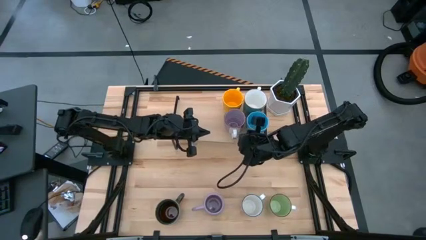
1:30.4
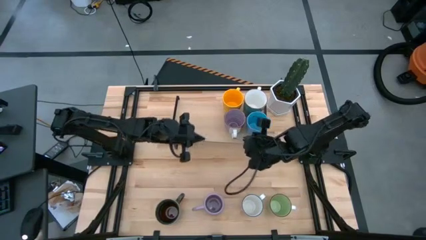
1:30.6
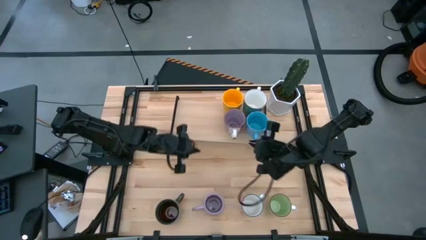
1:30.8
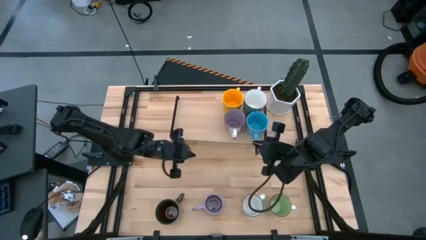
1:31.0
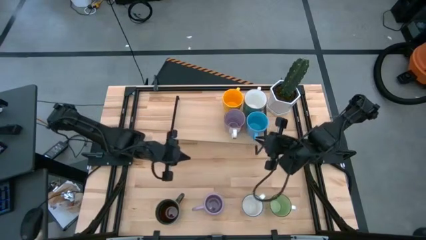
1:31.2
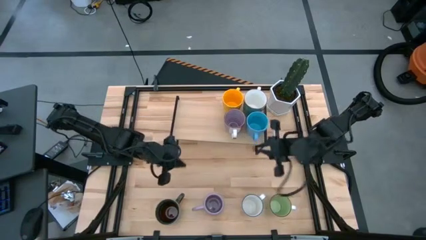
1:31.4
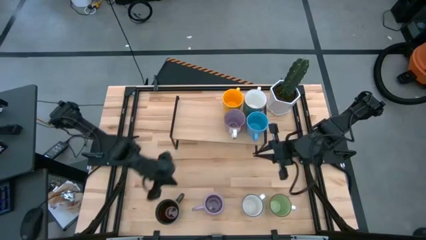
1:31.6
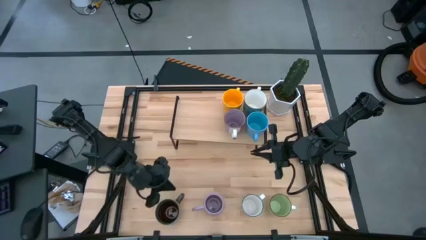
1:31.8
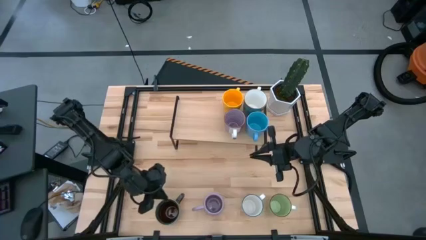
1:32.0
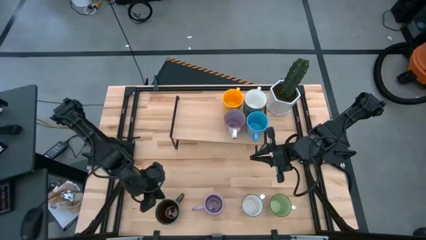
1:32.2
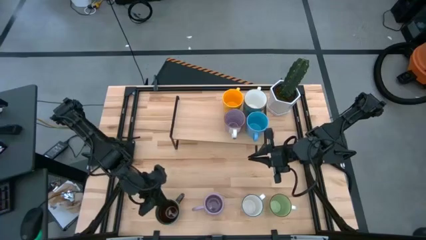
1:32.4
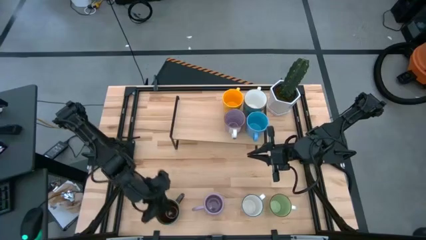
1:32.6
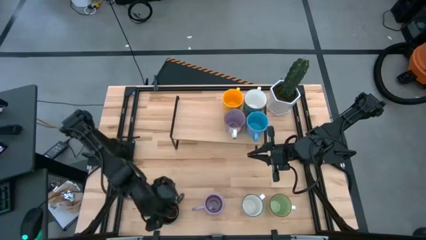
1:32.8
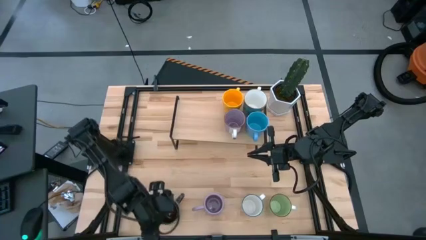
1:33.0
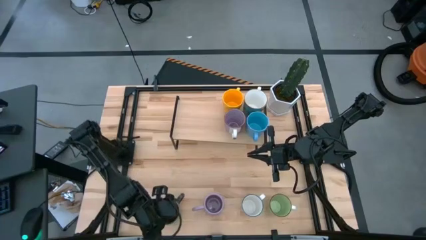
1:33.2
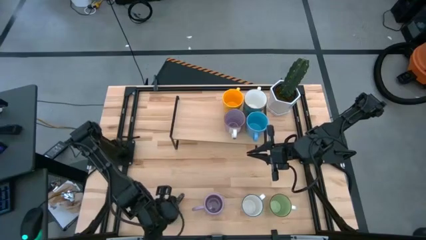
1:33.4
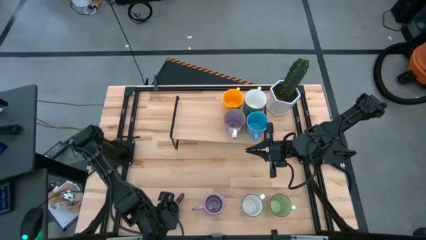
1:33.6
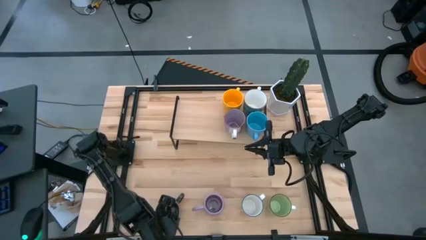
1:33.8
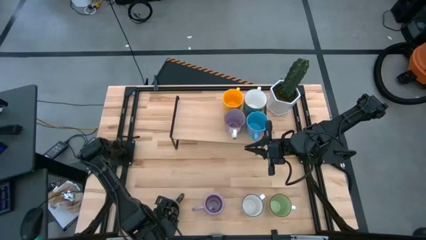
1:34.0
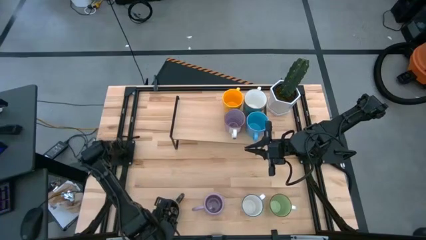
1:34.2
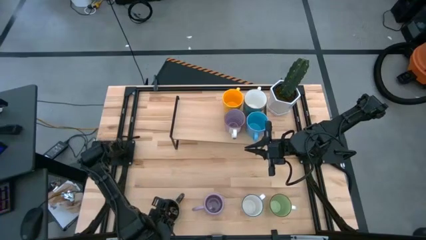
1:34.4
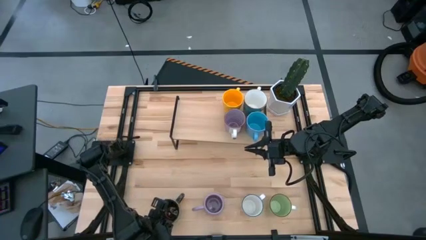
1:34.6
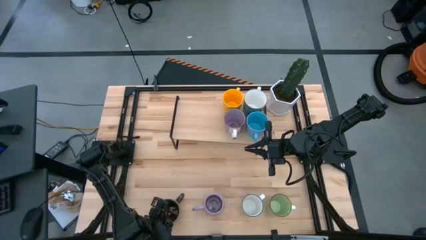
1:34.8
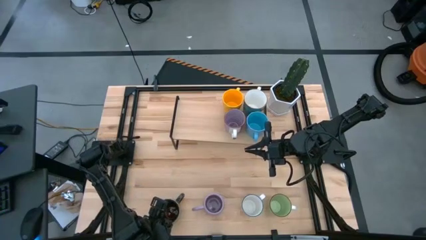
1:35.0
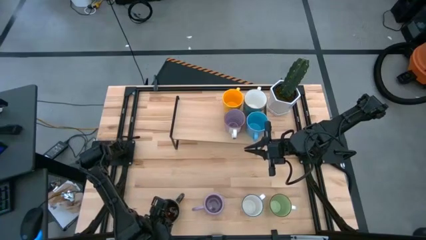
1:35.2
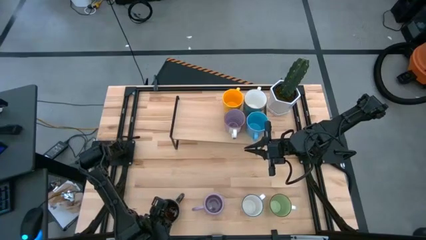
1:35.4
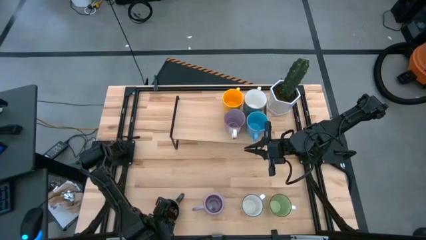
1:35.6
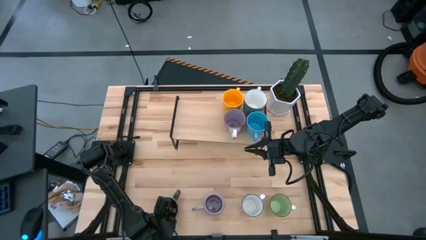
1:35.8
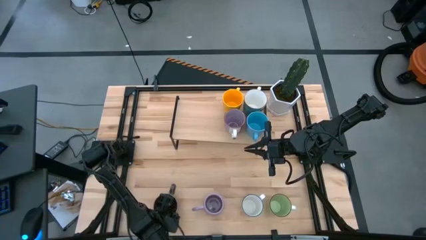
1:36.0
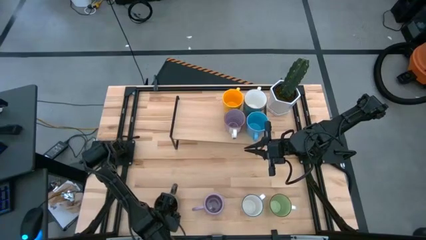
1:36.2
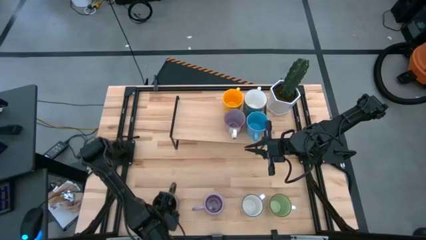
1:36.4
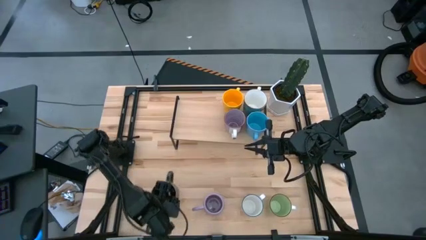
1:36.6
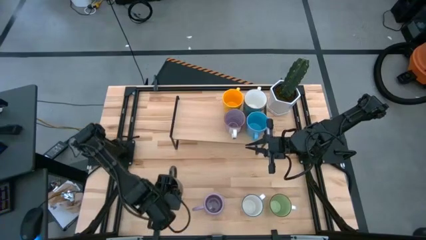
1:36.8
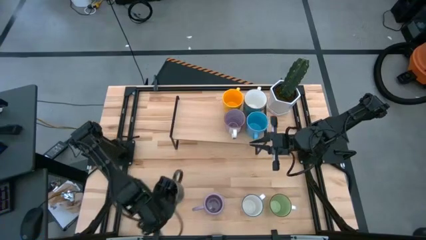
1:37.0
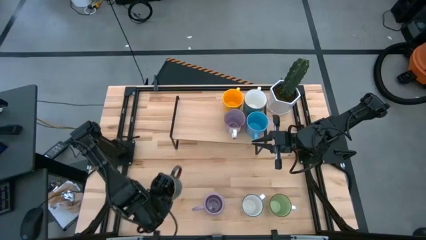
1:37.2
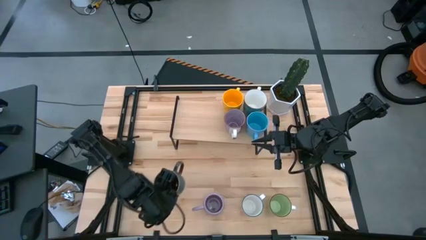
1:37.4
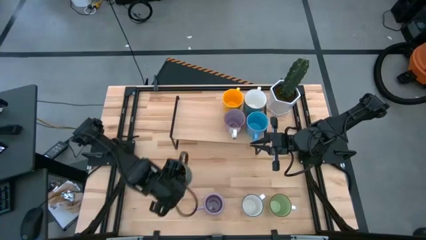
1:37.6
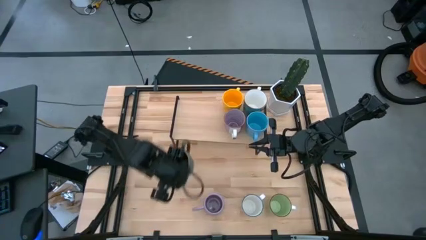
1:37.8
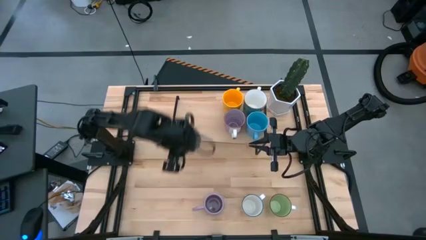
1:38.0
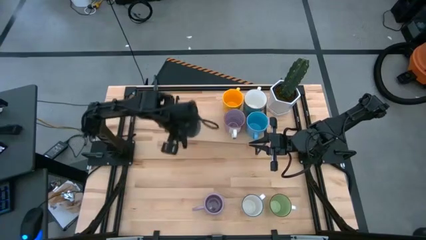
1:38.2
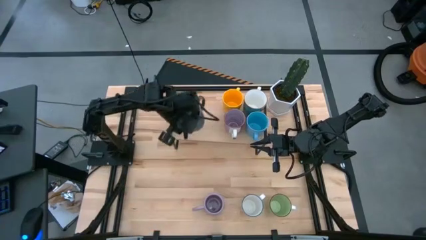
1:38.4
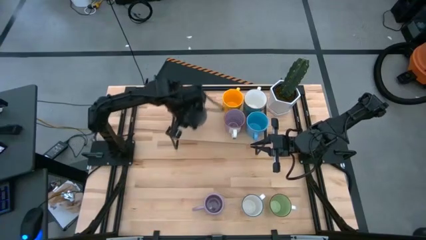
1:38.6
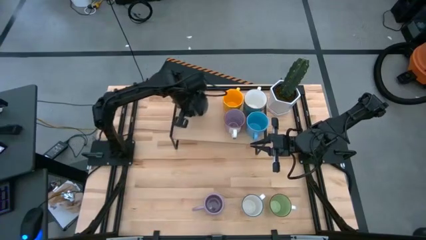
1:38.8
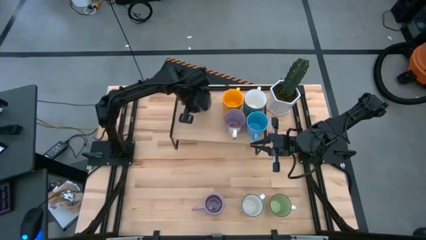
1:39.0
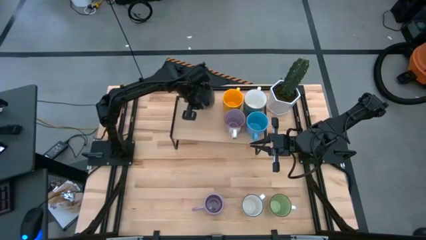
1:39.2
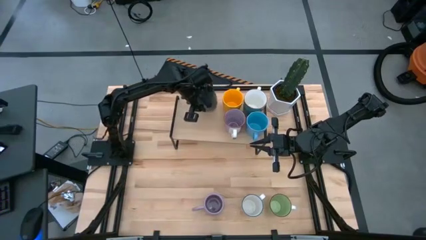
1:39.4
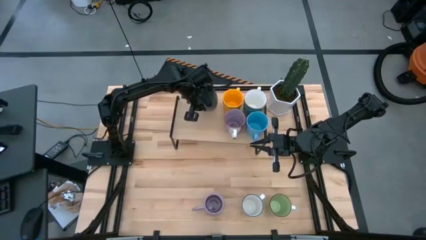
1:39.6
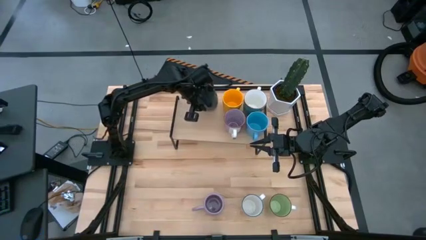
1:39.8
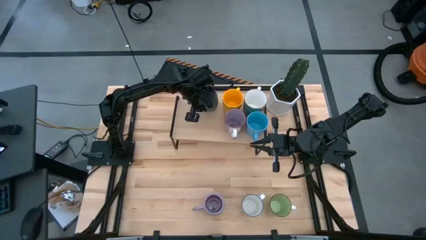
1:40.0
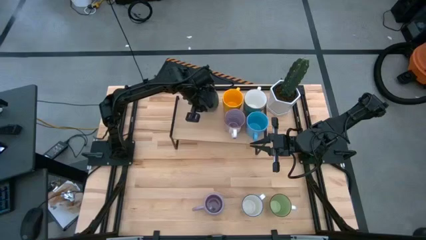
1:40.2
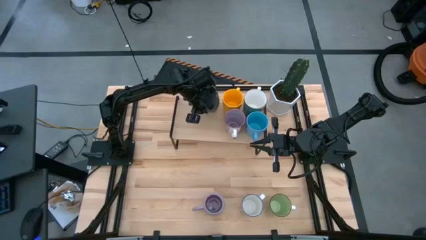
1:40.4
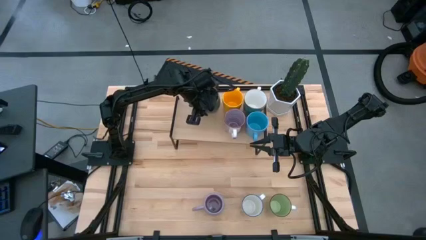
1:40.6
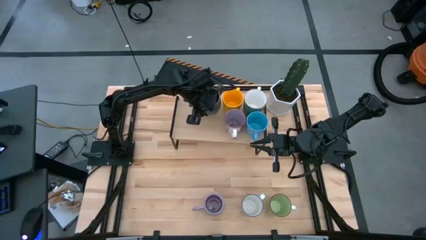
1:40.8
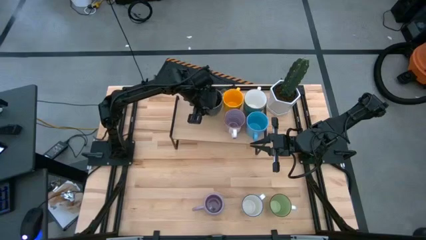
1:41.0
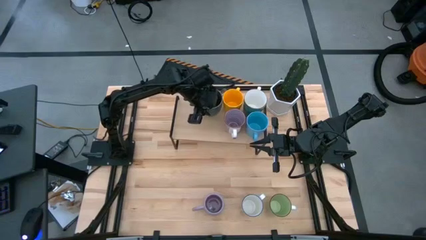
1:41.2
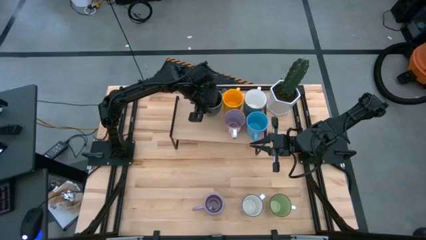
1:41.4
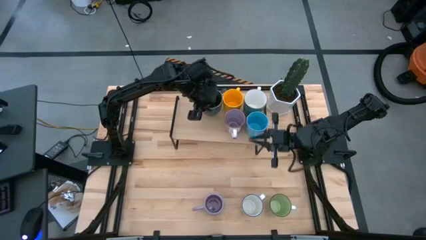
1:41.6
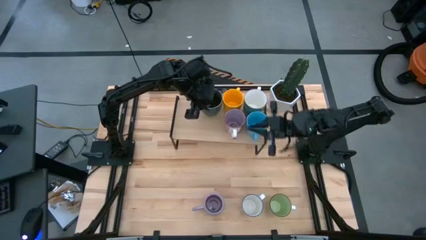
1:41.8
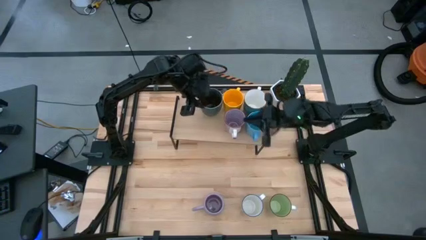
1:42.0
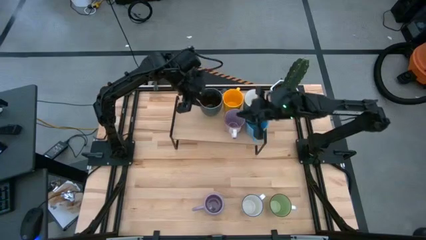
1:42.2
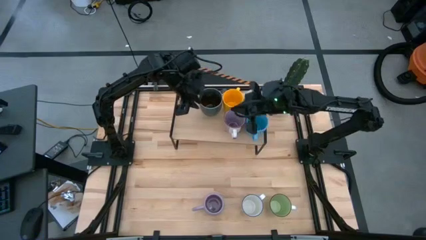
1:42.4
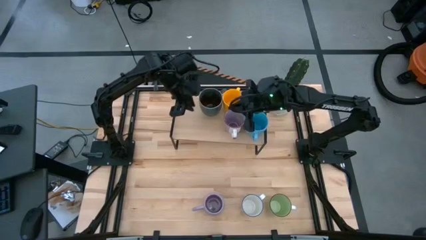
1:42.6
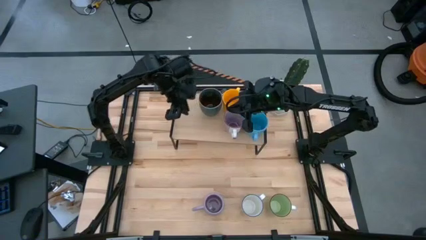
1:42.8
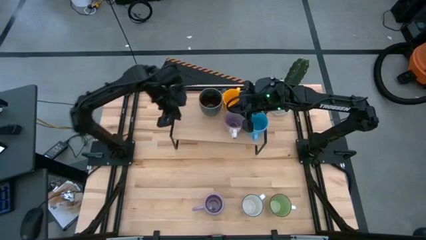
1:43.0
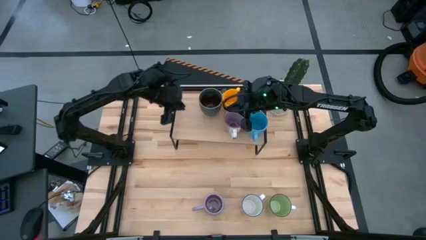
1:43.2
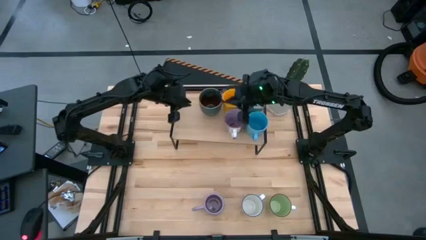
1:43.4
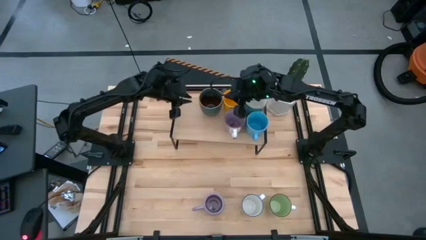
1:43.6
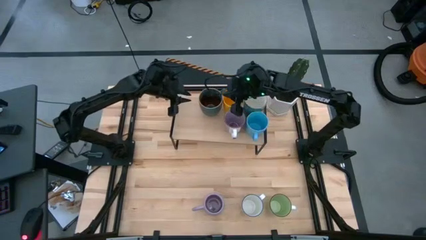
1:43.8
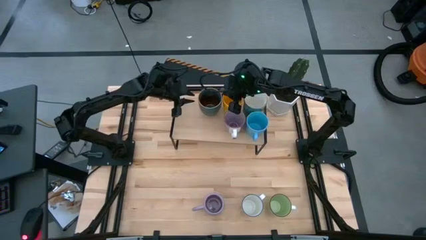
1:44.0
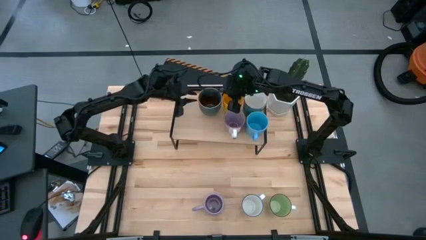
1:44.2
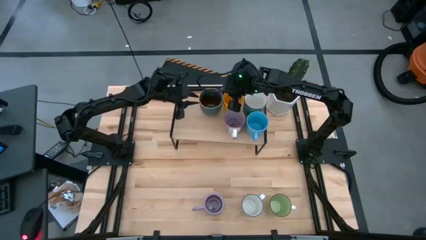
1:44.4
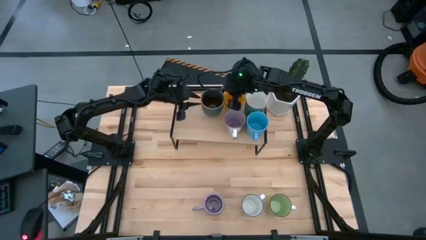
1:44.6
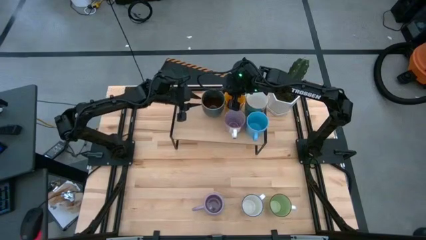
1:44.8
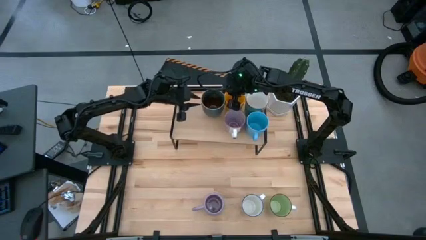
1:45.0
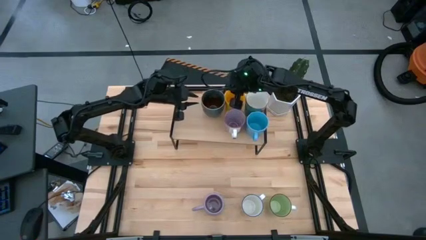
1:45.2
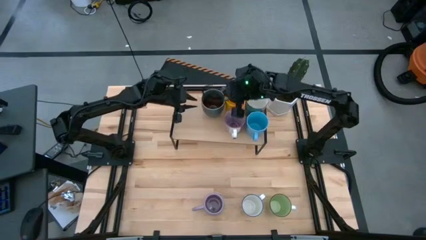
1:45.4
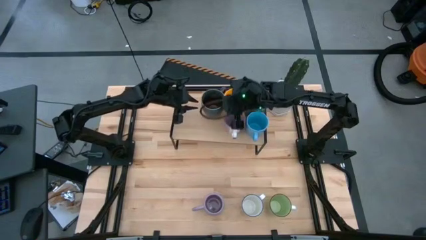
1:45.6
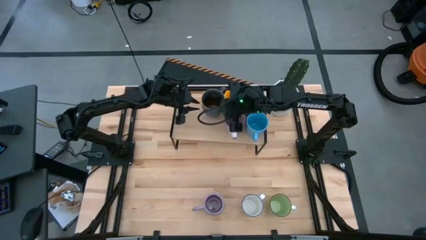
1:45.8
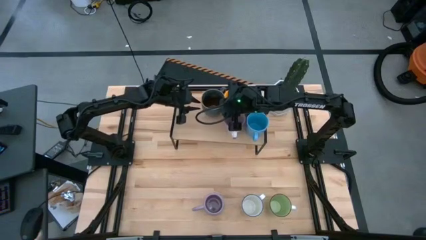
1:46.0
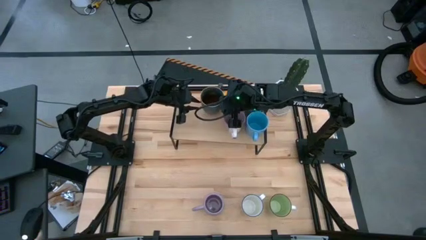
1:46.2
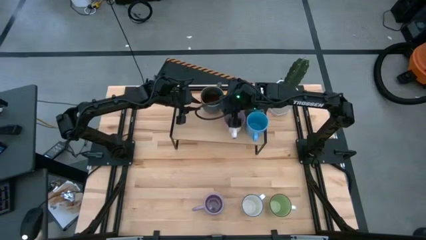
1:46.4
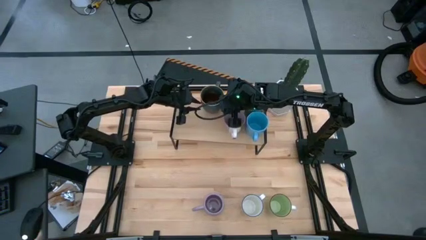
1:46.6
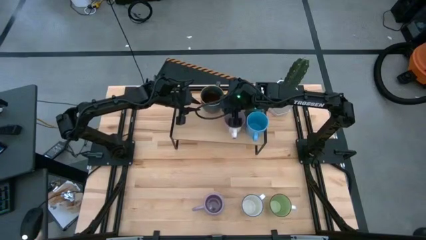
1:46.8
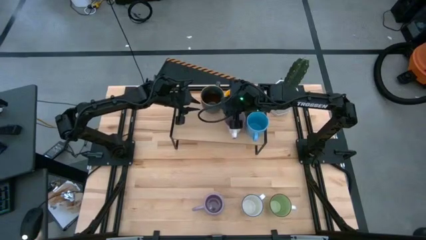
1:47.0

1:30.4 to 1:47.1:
Task: Place coffee mugs
Put the dark blue mug on the shelf
